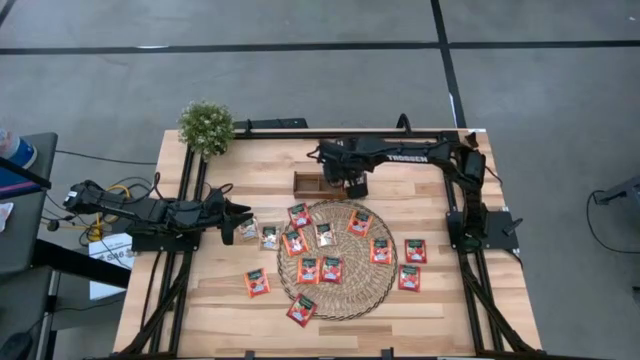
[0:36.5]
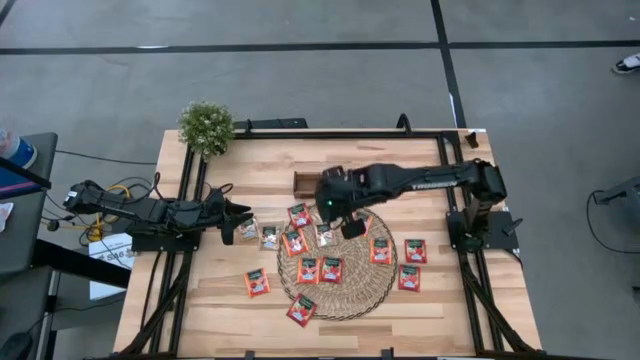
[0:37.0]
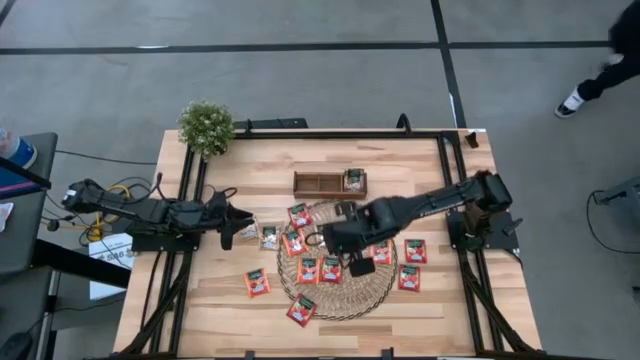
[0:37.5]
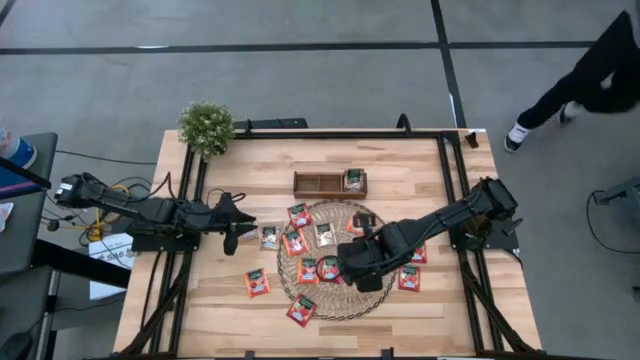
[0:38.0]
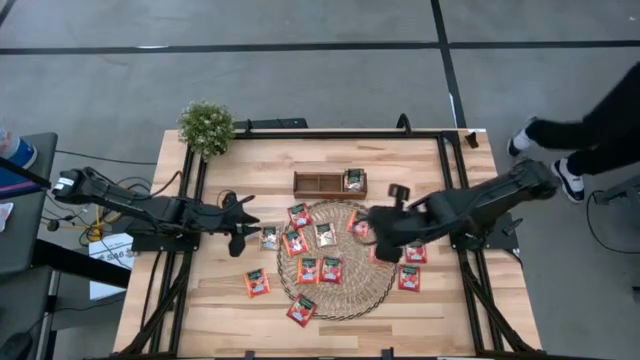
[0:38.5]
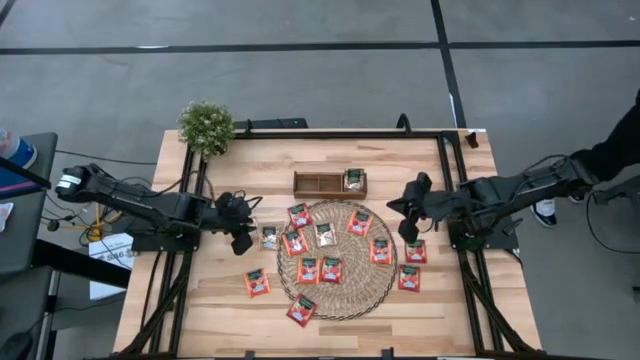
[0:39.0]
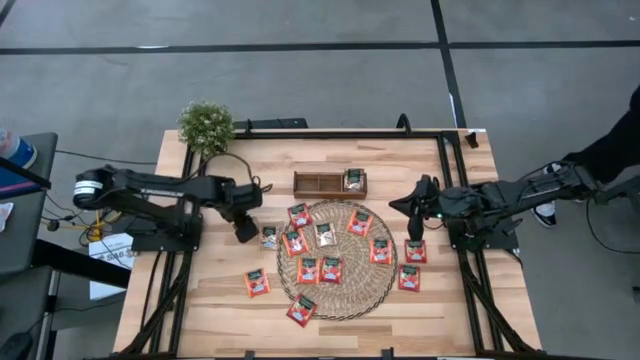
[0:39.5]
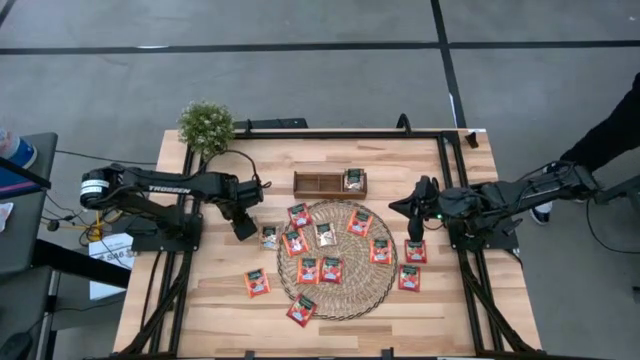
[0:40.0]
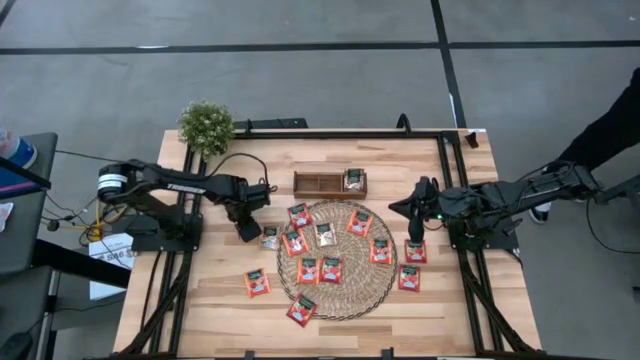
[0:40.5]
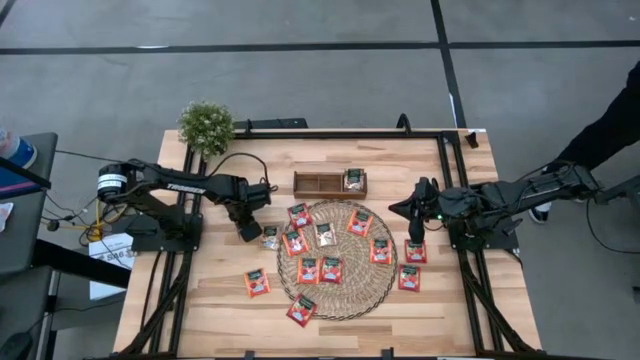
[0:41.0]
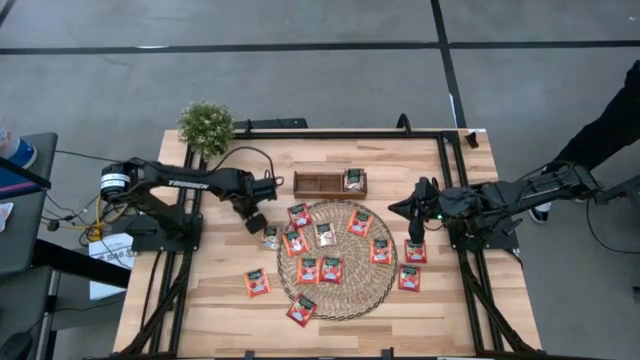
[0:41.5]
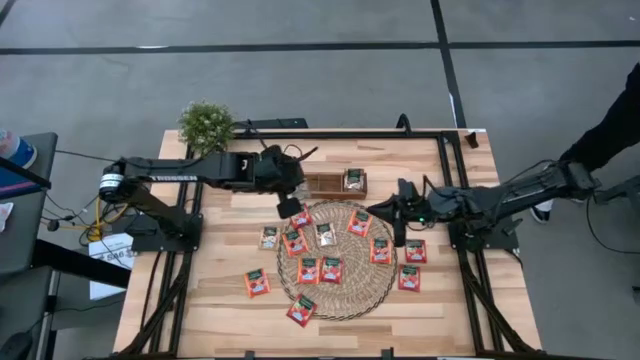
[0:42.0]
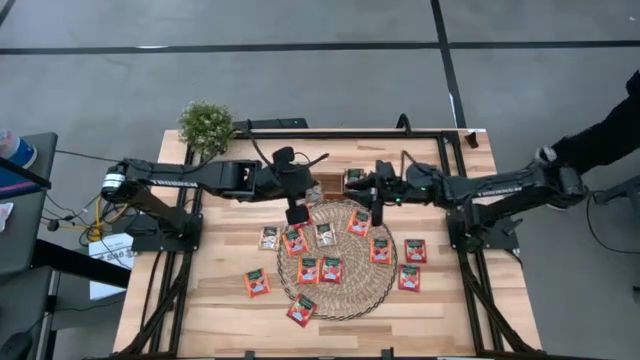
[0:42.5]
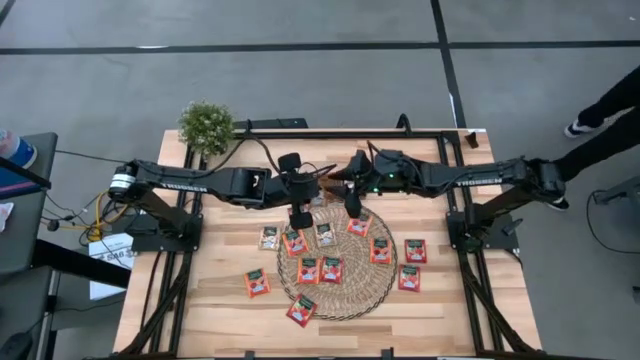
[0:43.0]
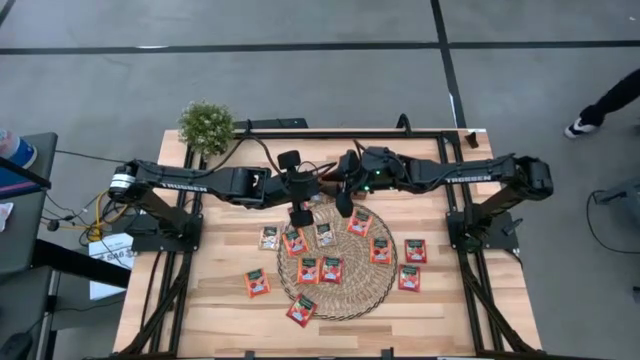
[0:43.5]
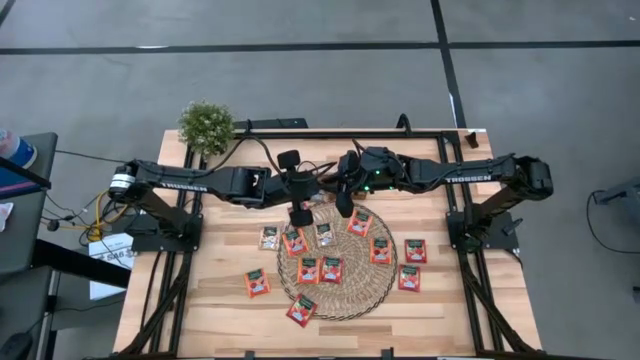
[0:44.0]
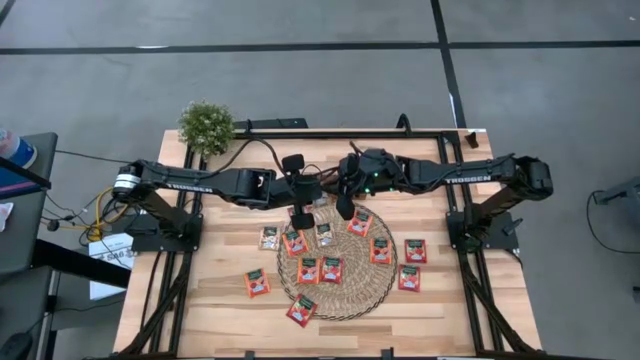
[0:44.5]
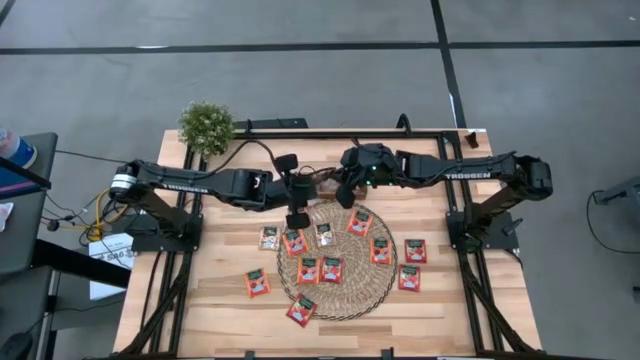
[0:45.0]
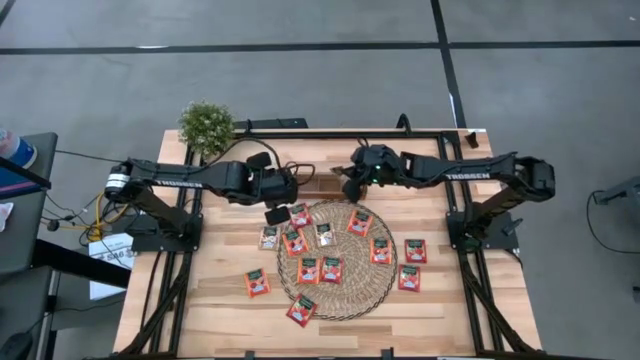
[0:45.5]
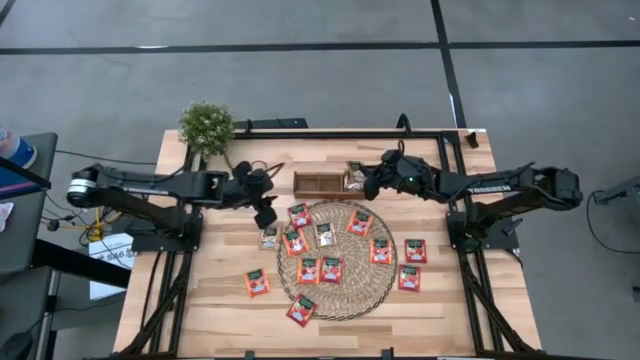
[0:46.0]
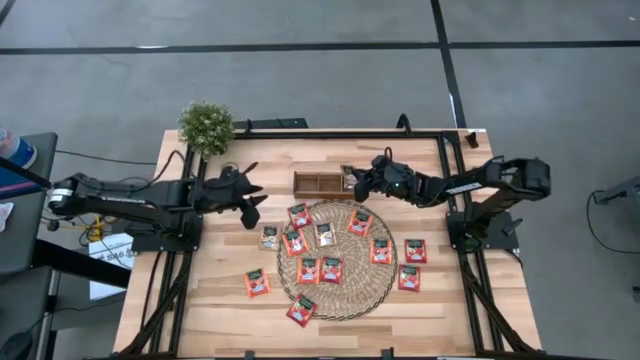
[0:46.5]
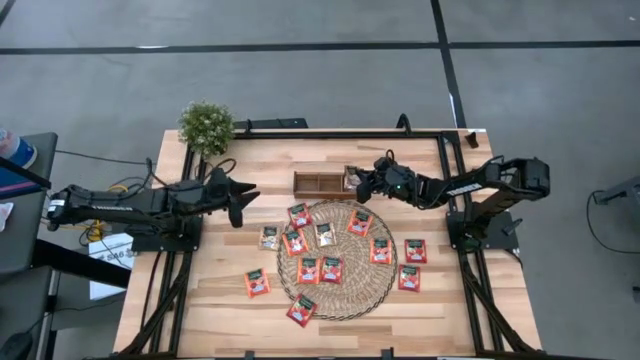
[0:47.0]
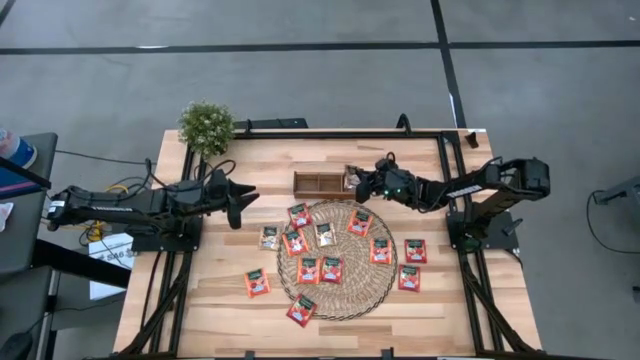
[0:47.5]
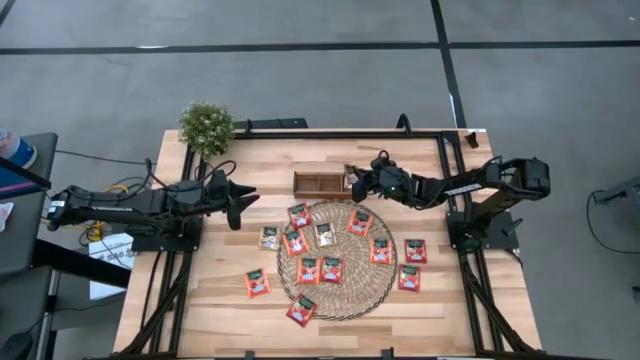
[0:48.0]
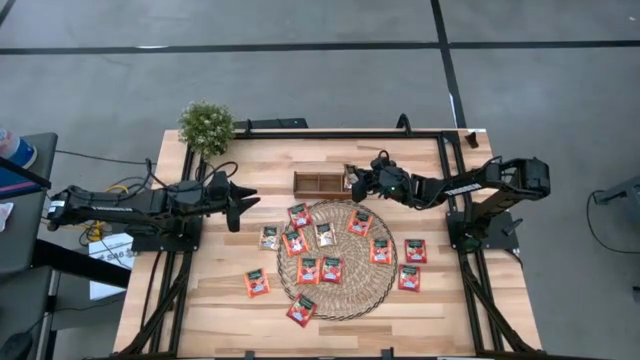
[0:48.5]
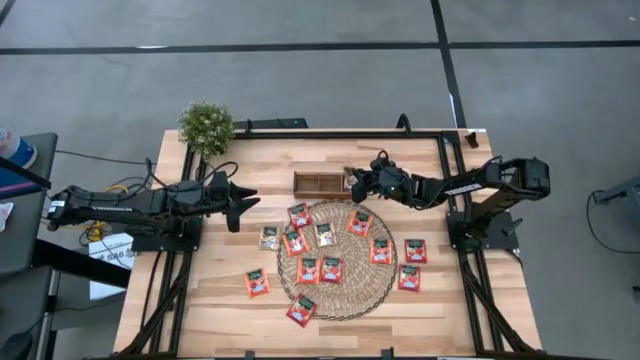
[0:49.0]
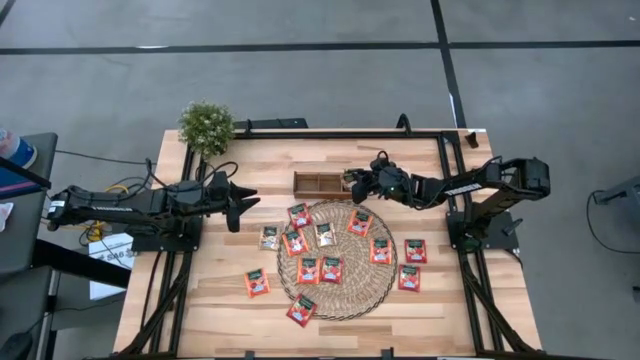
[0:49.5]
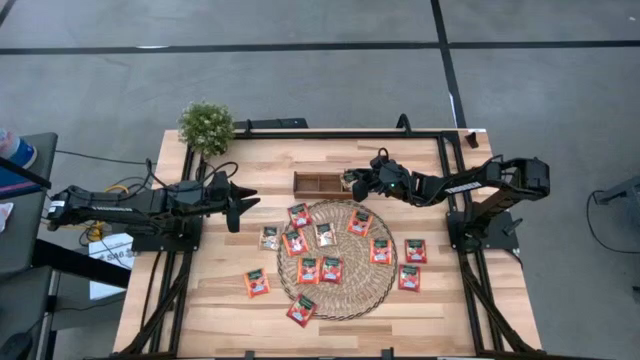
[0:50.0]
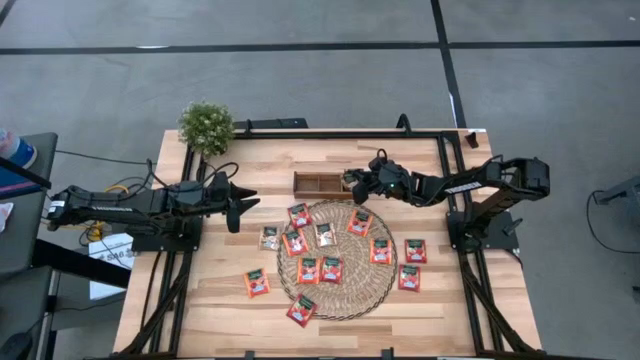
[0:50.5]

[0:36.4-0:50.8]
Task: Pick & Place Tea
Put the brown tea bag into the right section of the wooden organizer

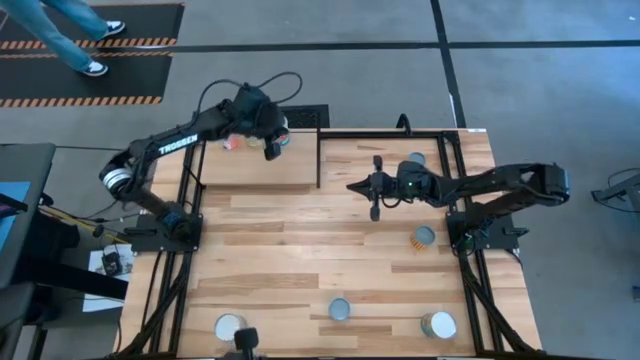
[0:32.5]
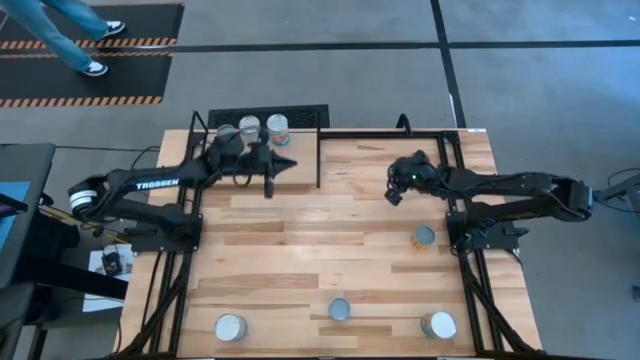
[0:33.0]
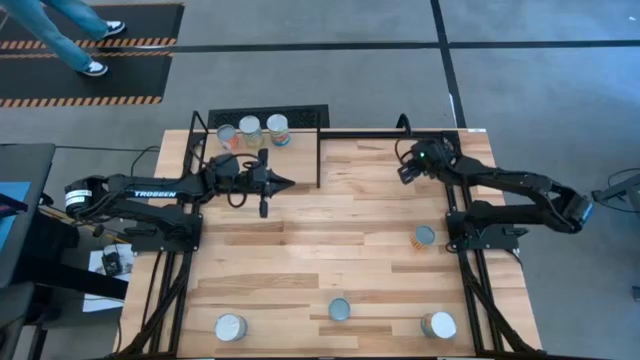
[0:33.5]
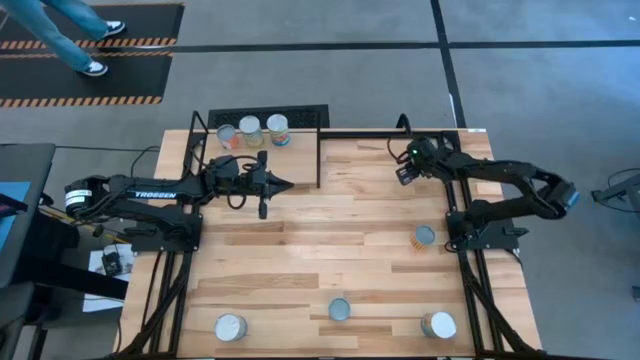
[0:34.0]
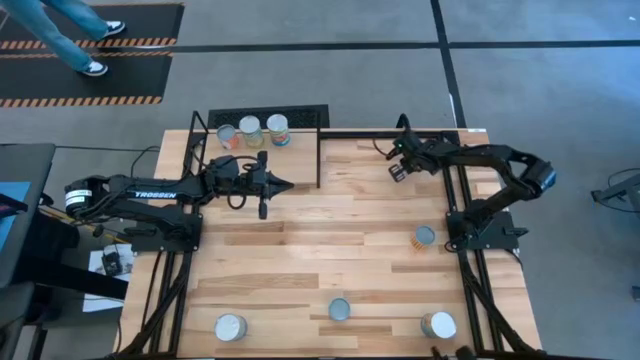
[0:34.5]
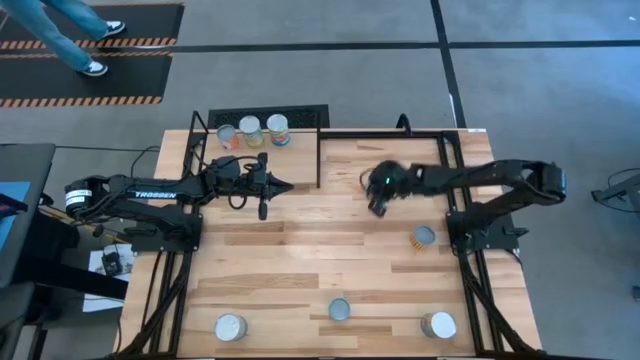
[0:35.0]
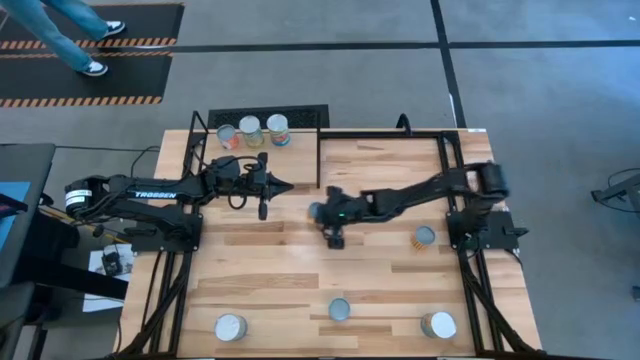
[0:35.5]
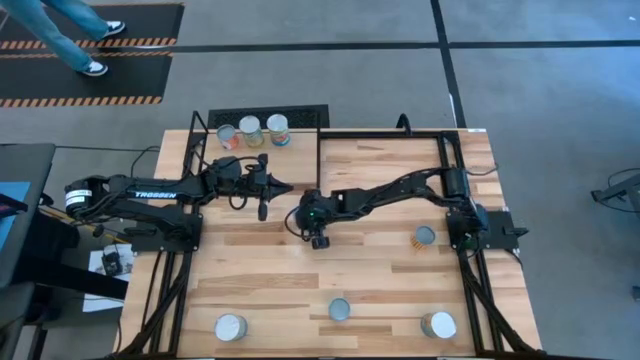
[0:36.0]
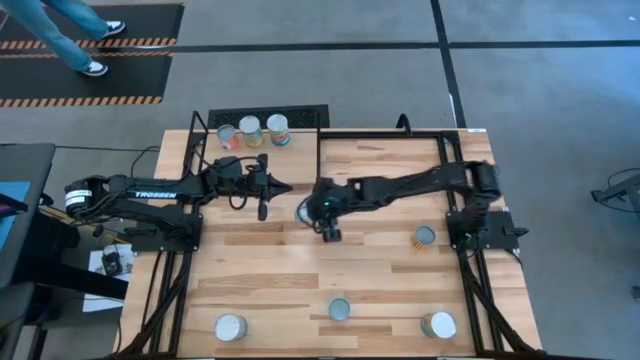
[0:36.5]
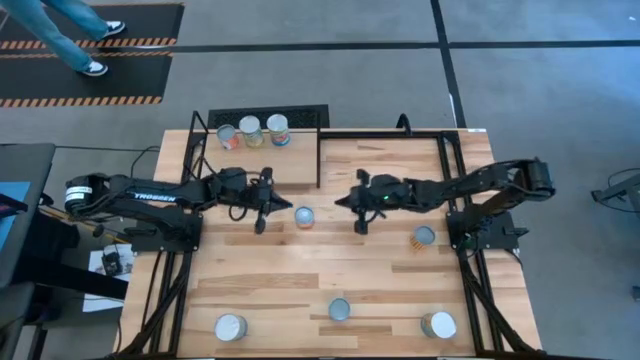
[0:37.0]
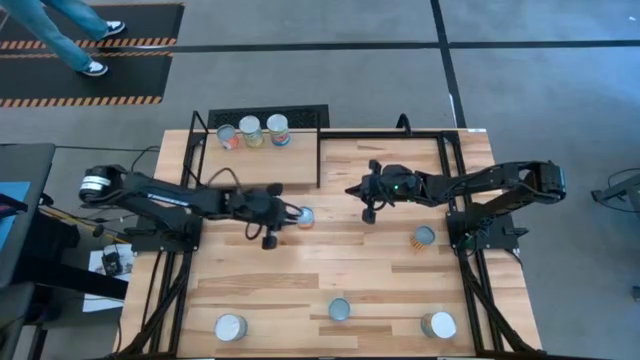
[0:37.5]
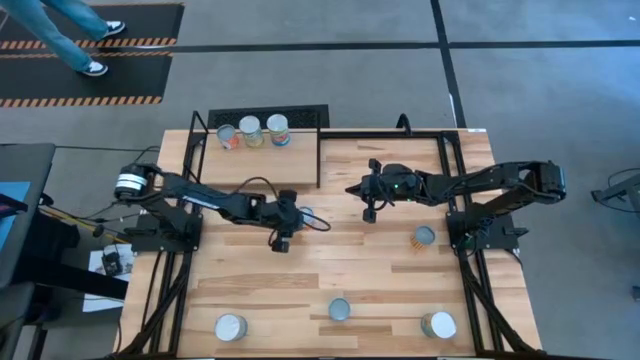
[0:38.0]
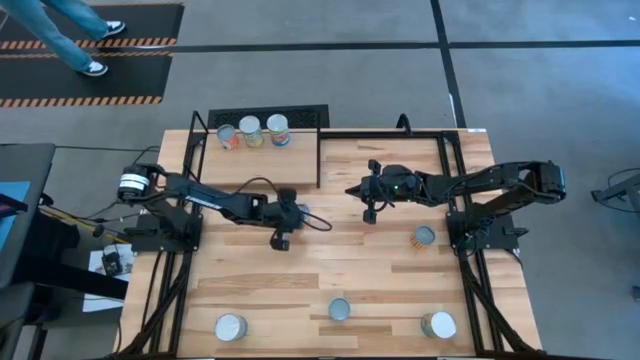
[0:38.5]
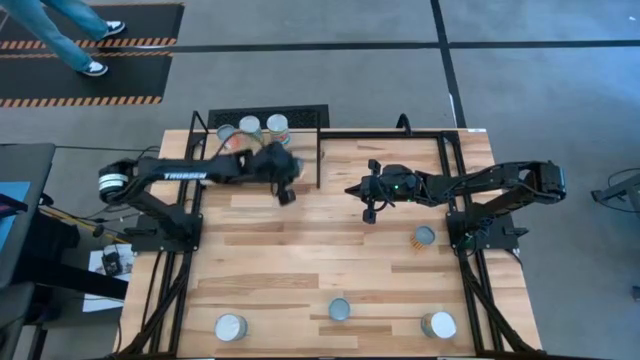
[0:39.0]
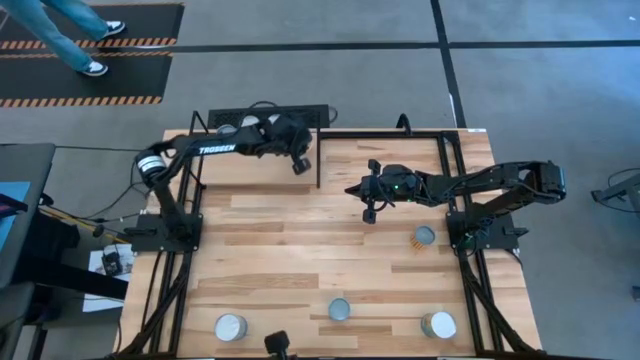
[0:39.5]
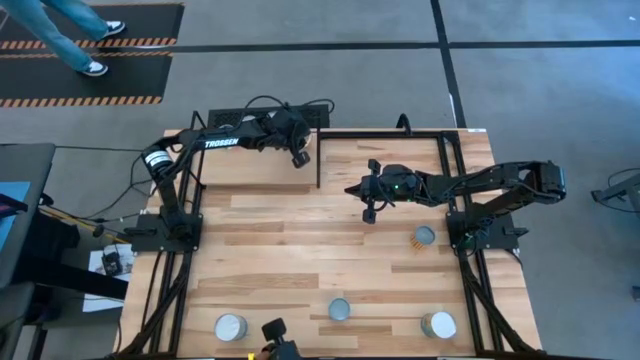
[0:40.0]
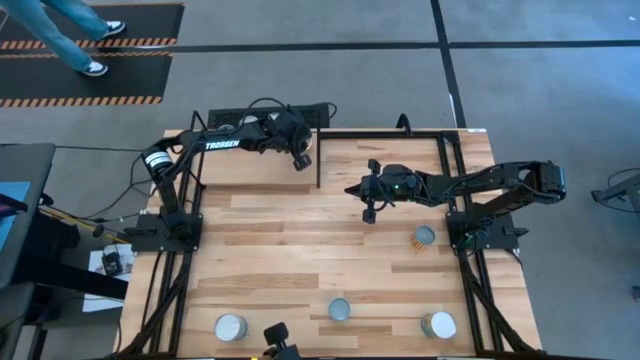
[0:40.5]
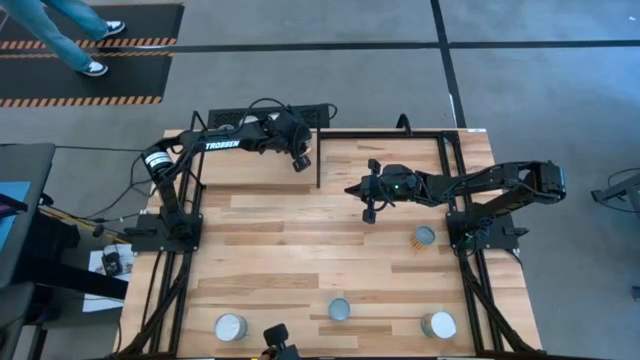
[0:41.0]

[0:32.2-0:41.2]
Task: Pick and place cans onto a shelf
Put the small canned pineapple rings on the shelf
